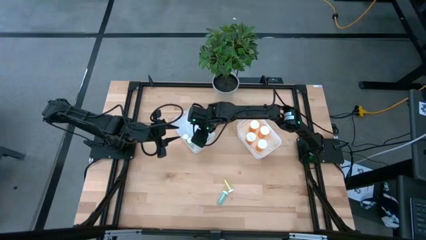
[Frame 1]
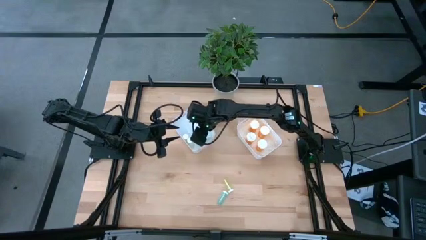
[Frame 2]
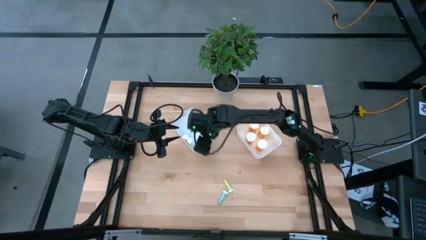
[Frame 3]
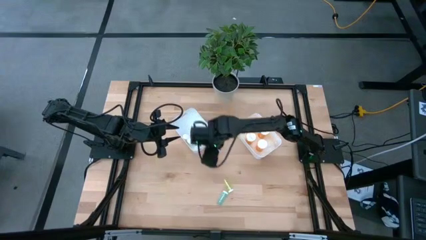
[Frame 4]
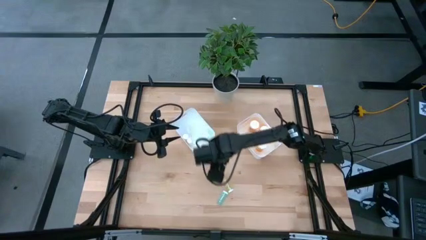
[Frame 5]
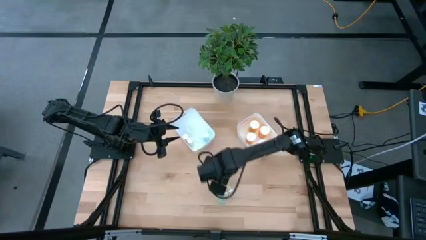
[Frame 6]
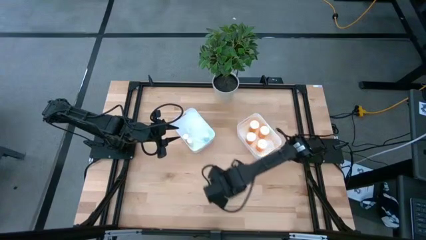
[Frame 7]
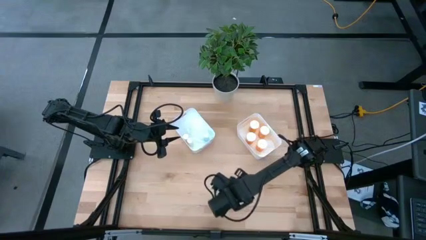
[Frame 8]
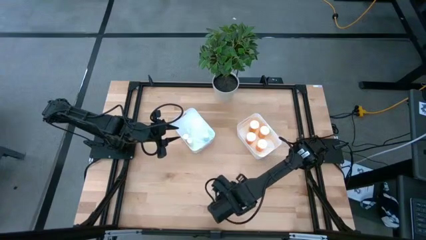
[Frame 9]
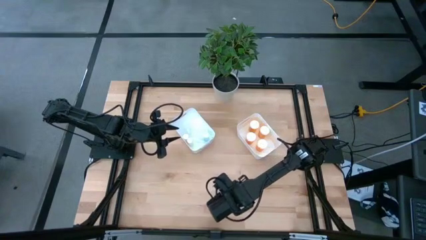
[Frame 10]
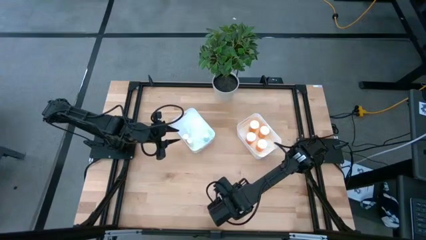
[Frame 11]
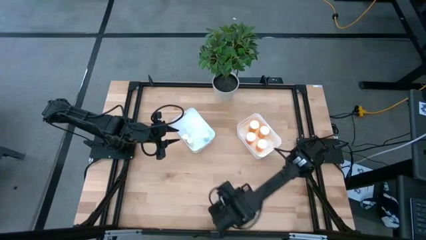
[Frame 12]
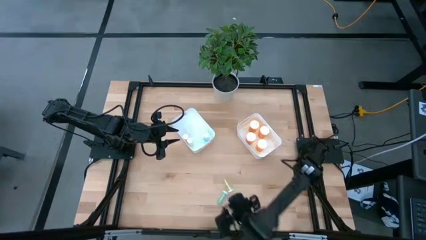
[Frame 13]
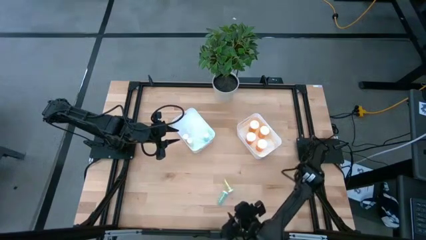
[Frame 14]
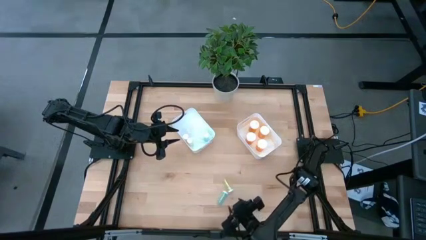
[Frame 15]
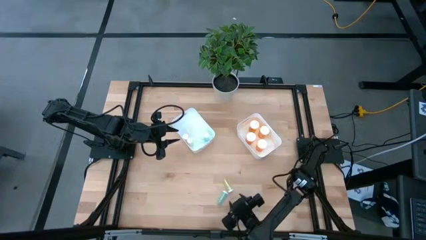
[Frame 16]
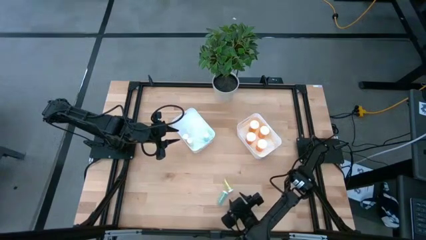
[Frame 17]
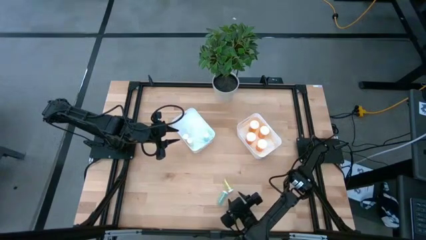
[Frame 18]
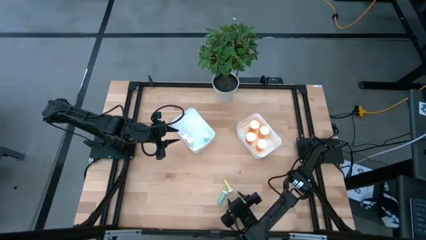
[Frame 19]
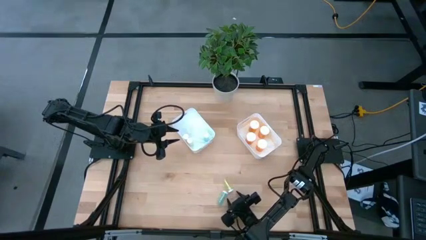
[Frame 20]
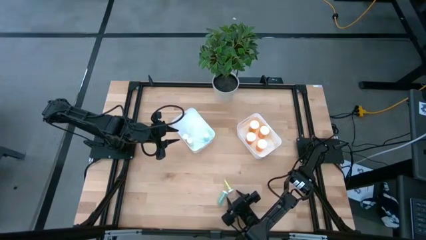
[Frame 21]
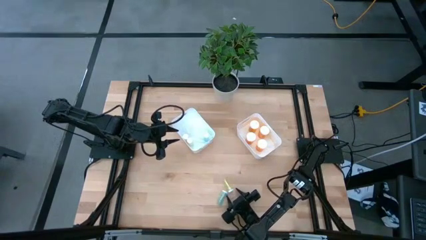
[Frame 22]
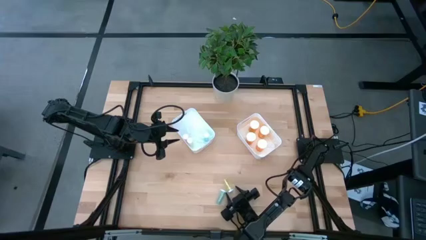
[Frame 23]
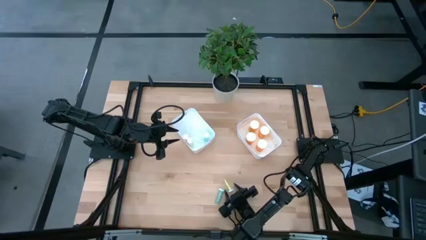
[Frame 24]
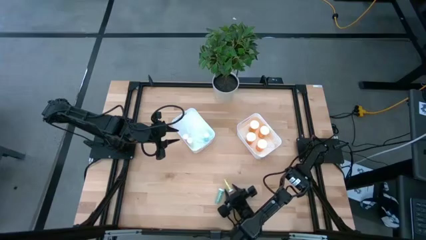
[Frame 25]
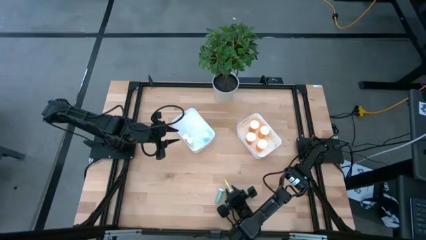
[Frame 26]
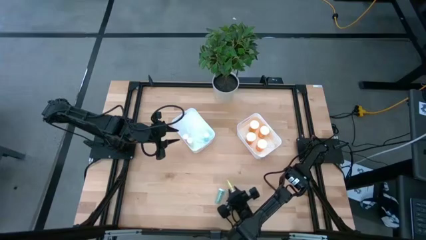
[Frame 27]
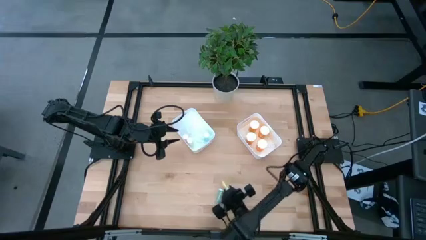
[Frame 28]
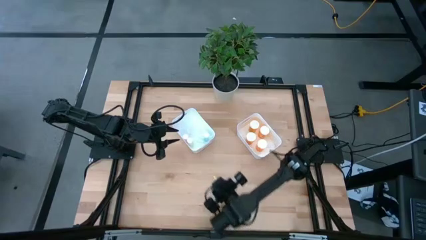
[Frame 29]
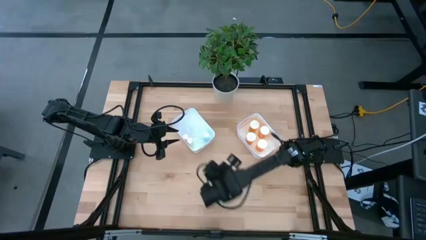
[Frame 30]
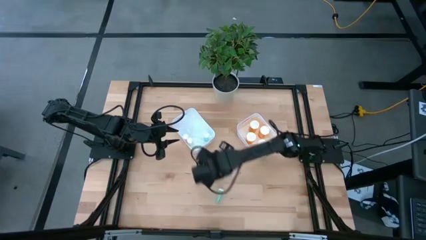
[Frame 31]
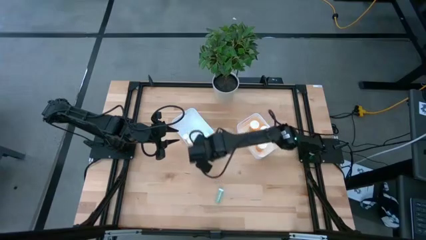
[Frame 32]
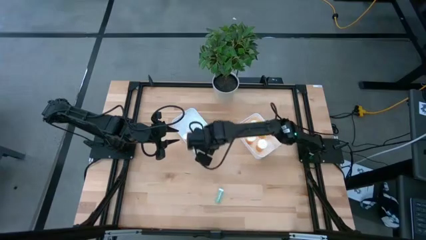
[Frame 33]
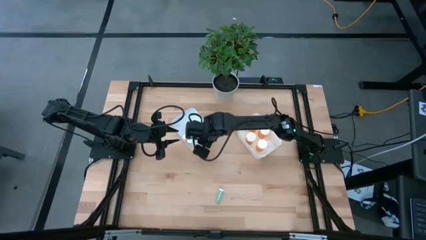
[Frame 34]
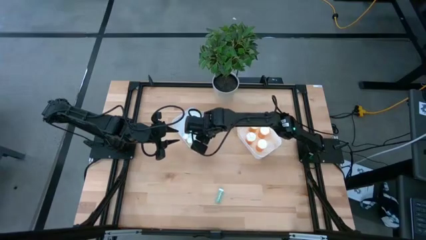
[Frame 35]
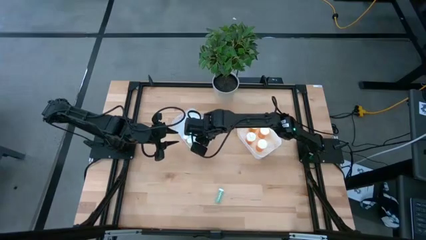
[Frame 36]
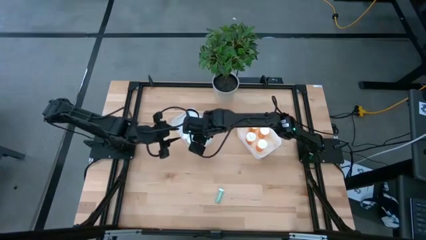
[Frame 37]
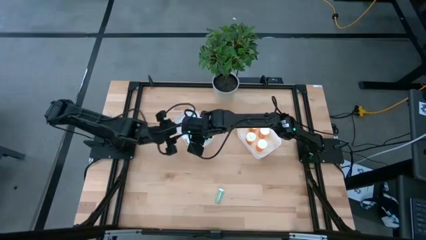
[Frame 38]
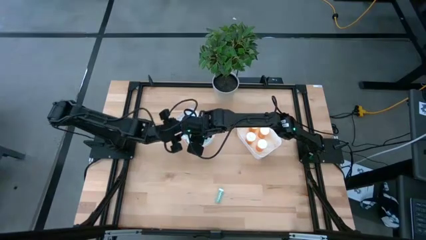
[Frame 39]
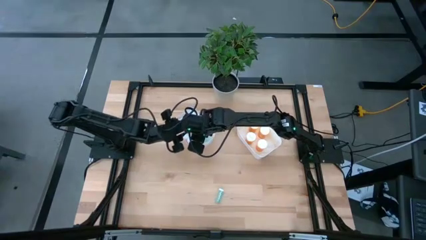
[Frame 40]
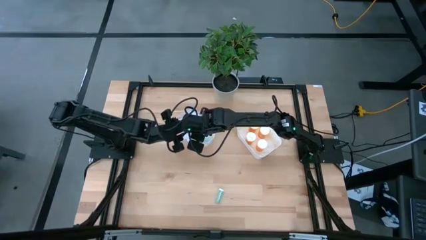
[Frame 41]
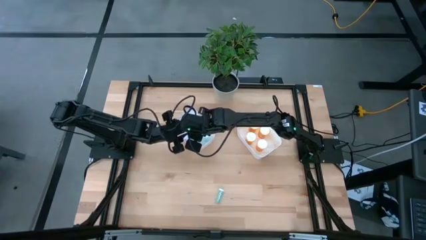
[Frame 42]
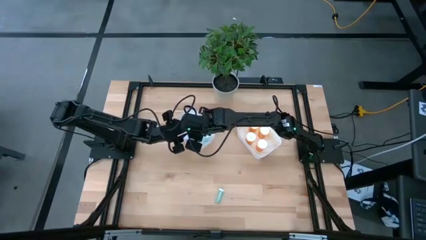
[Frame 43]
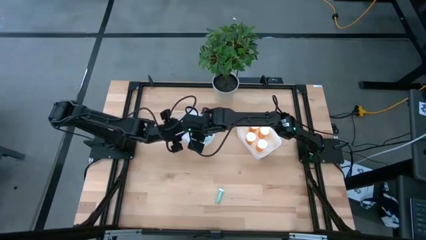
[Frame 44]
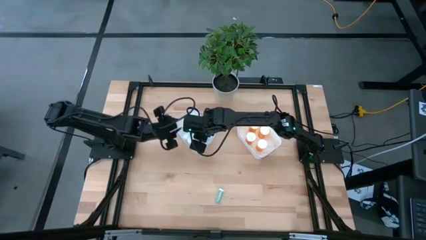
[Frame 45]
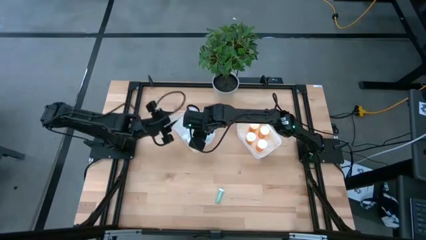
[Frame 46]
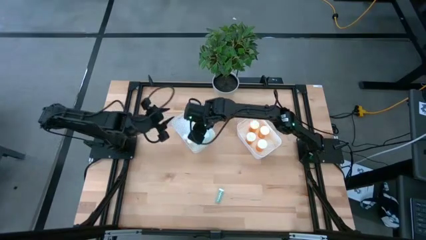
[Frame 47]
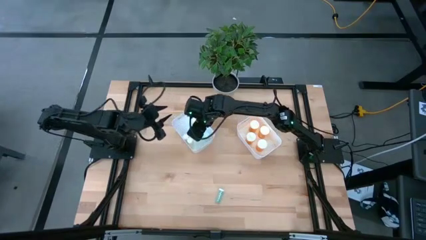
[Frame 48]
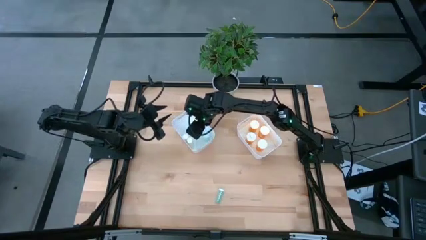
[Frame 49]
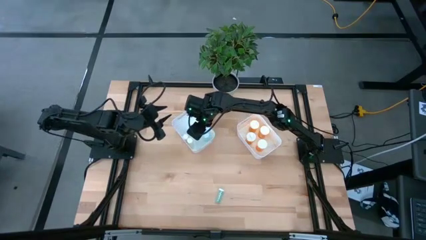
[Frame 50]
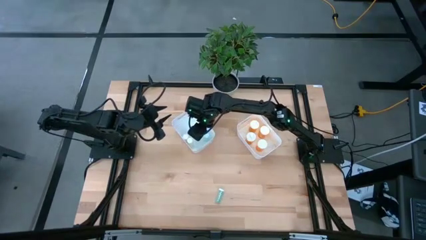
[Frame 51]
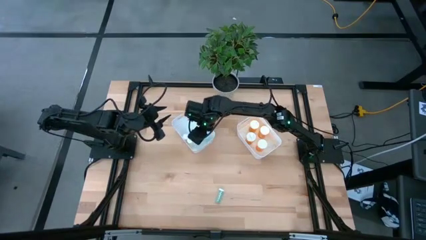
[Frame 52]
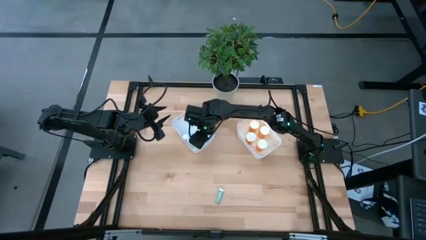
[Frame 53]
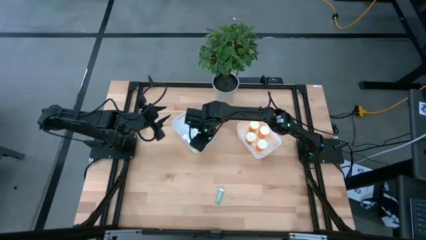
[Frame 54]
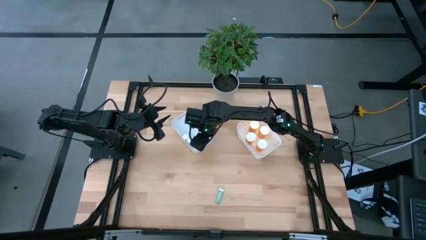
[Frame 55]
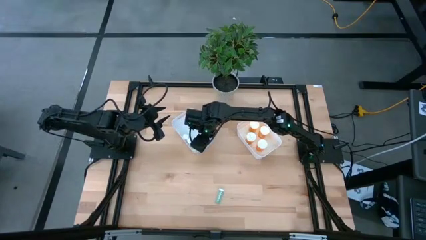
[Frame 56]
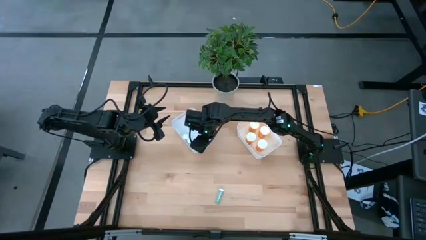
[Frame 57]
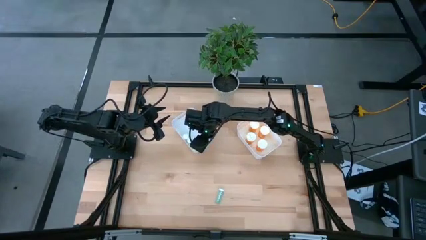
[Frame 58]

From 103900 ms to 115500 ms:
Task: Pick and place medicine bottles into bin by pill shape (circle, oval)
Put the yellow pill bottle into the left white bin

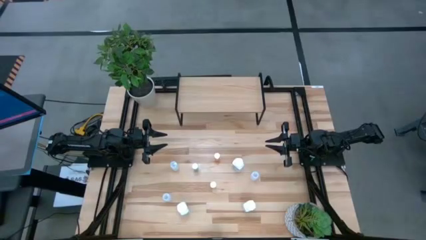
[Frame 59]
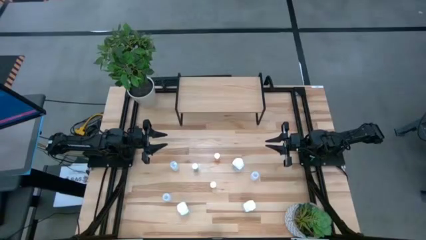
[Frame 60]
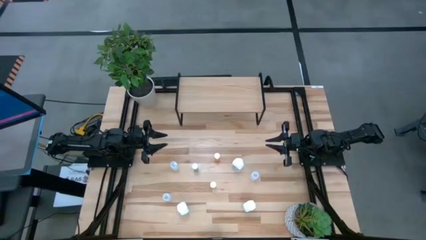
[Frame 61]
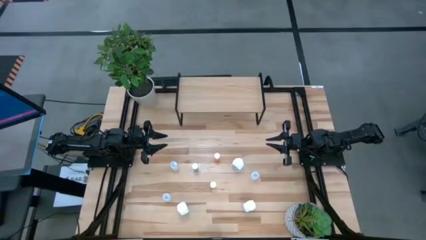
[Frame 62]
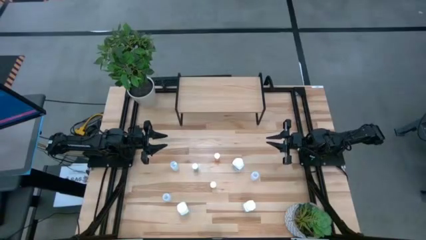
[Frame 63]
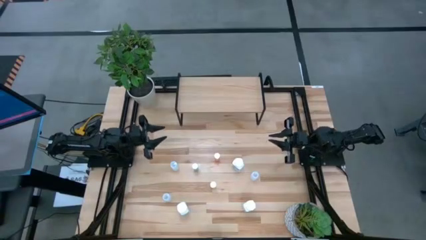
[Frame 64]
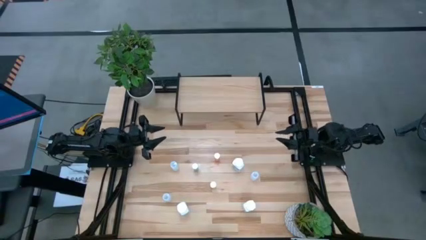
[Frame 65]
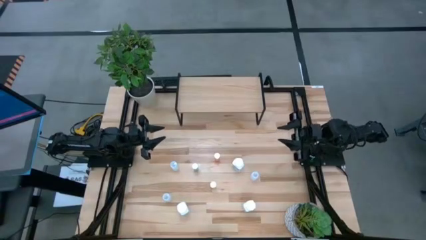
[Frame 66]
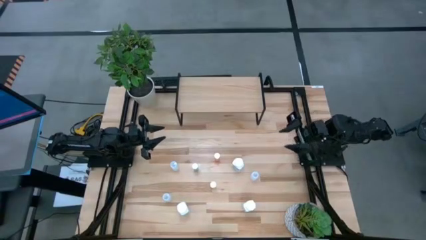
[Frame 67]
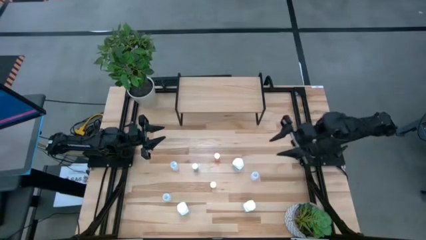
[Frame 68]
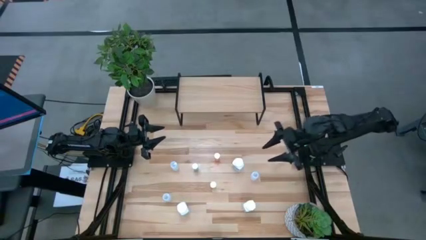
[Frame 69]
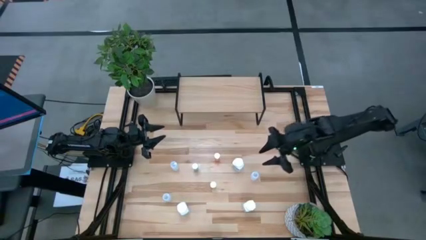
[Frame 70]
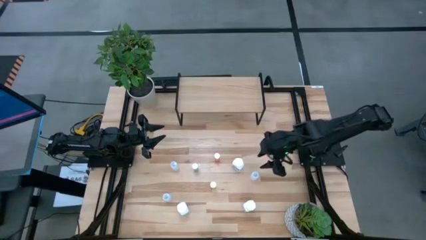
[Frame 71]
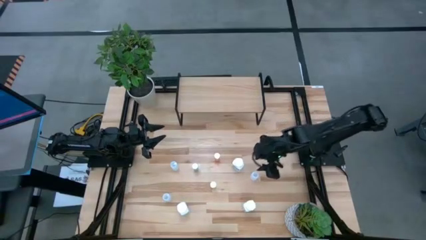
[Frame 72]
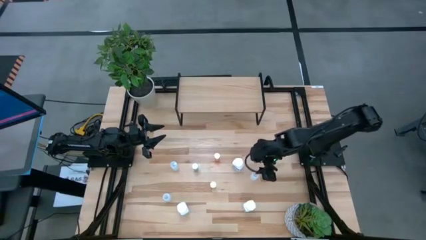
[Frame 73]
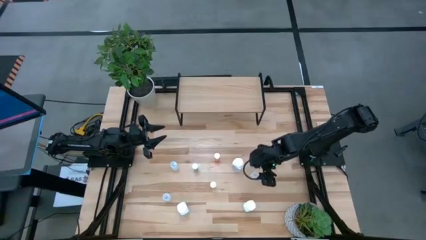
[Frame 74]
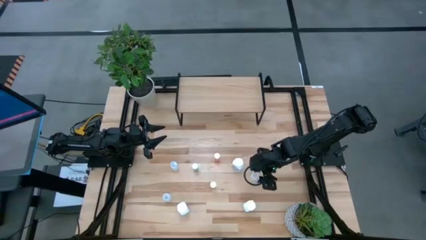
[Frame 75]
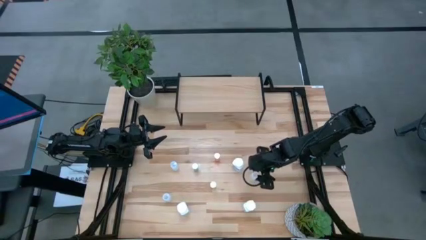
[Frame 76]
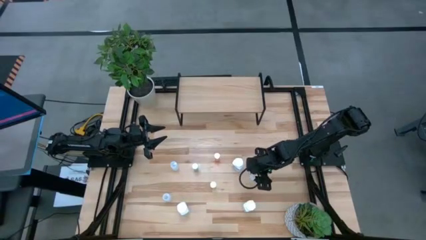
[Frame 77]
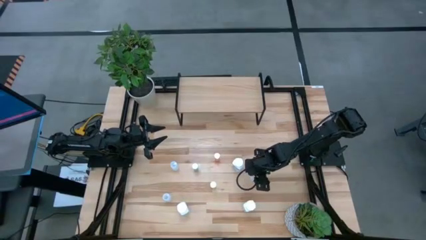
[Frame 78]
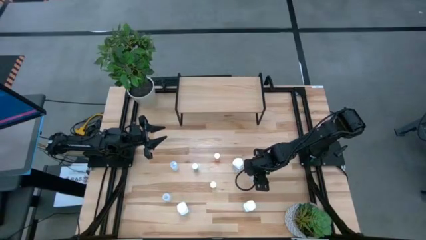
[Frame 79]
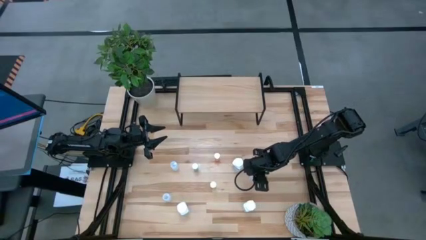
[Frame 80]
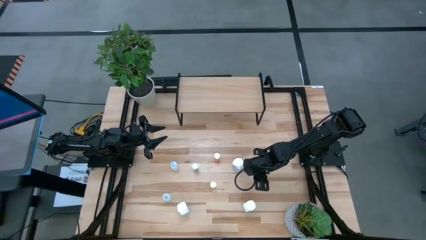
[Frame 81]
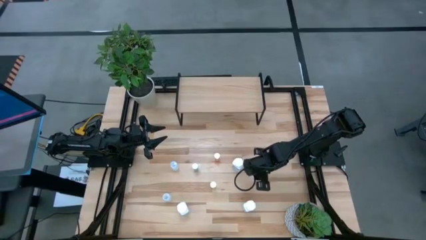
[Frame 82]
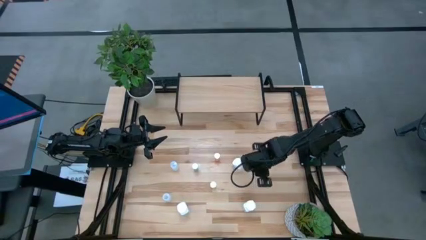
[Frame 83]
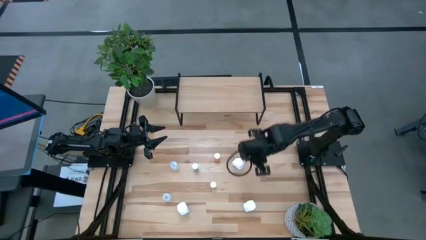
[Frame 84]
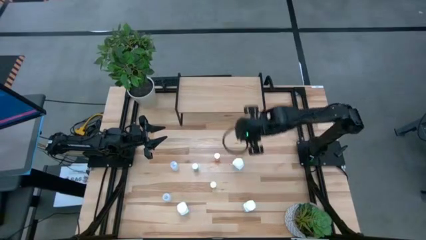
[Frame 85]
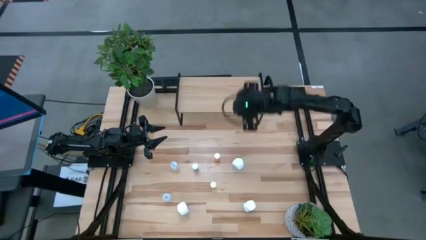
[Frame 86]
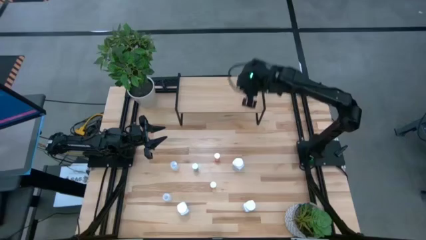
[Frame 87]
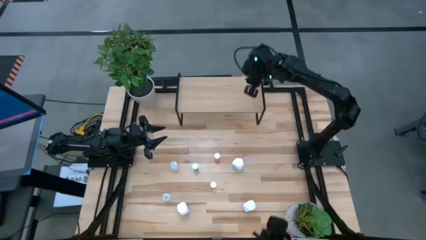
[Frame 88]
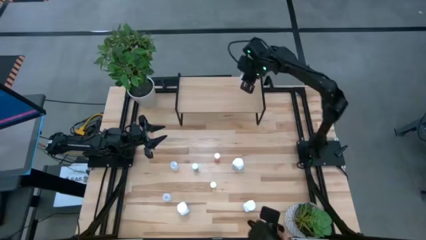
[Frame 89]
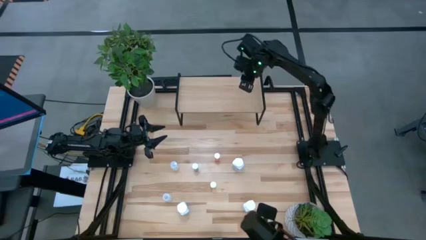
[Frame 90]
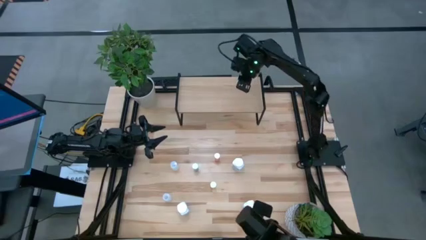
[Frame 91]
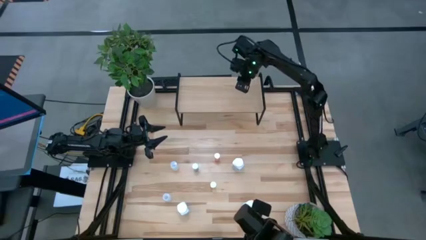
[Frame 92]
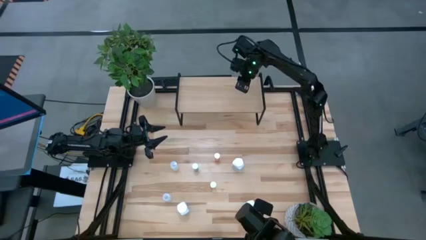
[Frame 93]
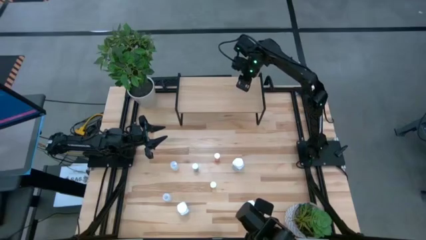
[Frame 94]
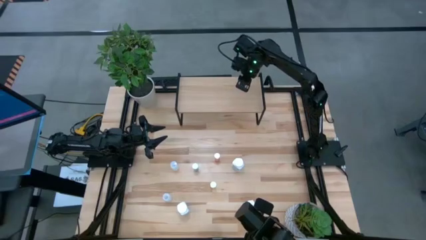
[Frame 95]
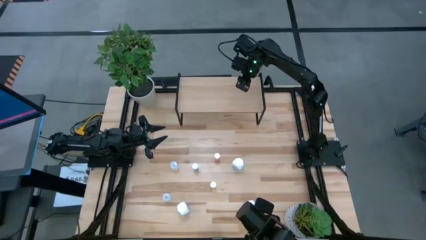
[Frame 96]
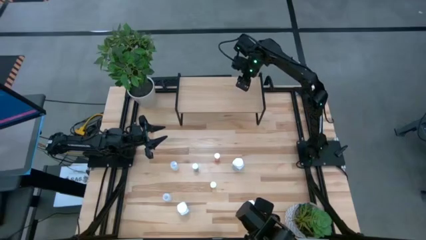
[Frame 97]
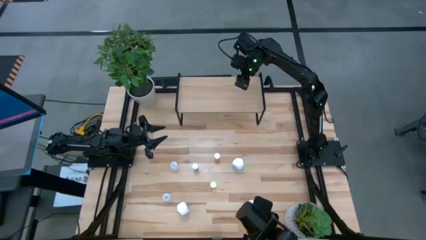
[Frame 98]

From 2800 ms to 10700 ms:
Task: Pick and place medicine bottles onto shelf by color
Put the right white pill bottle on the shelf
